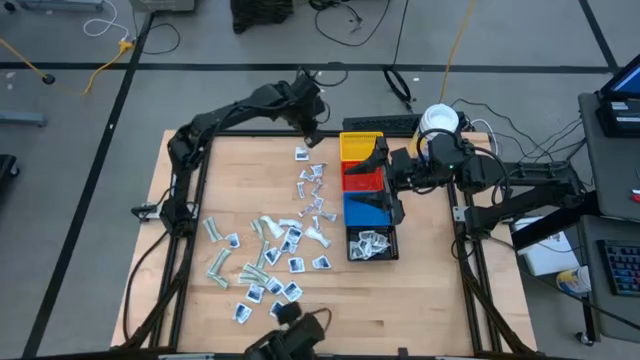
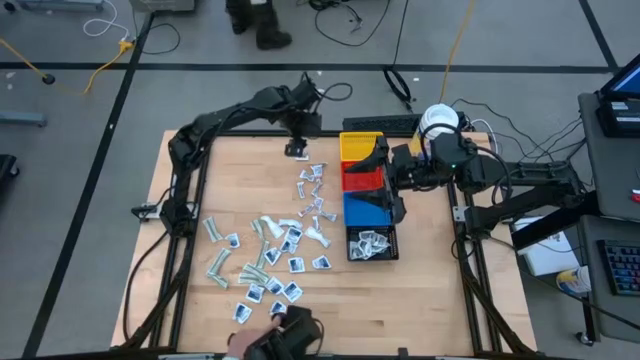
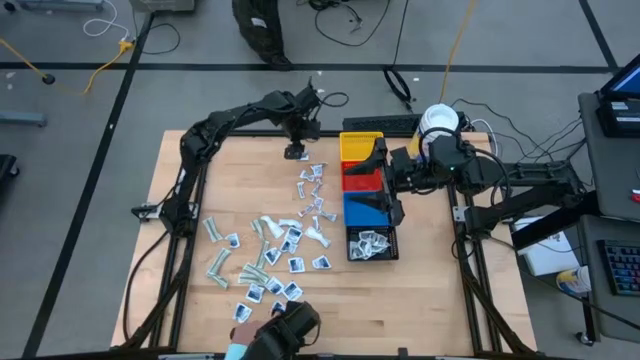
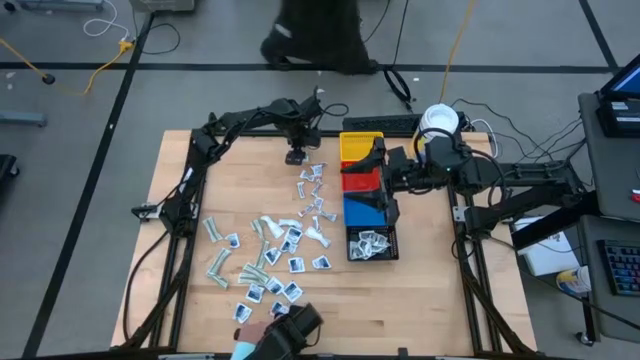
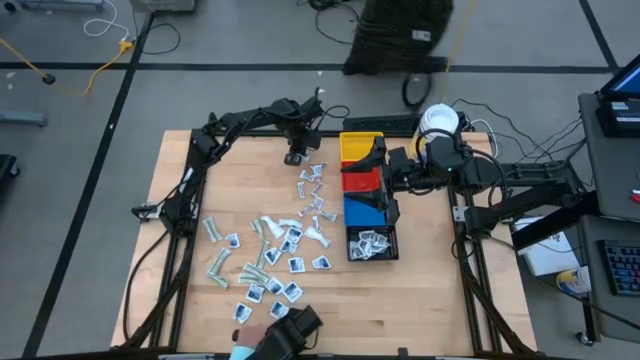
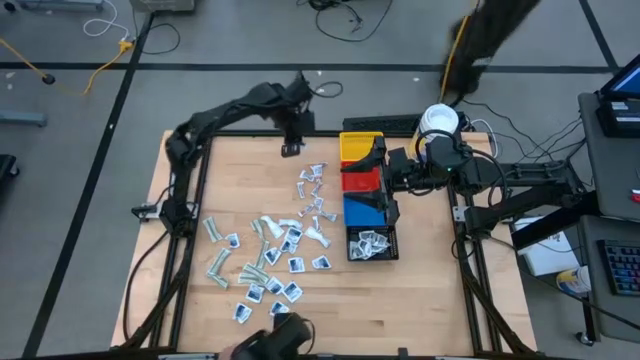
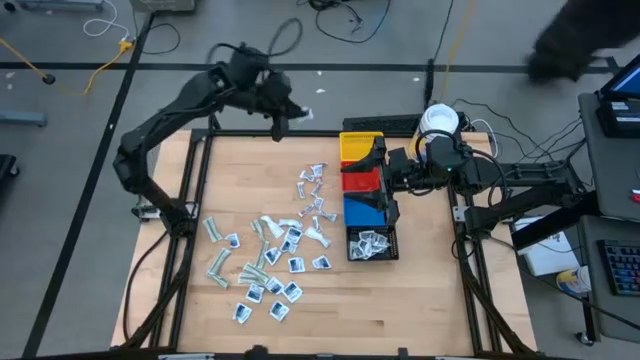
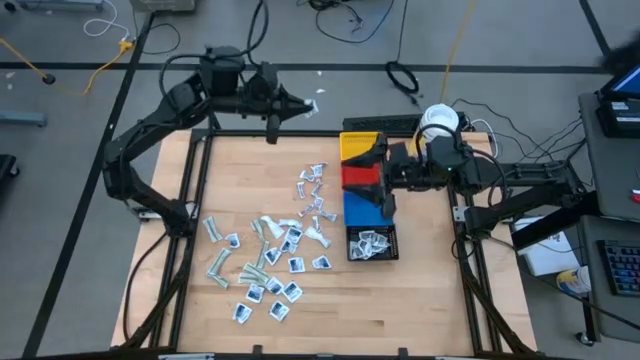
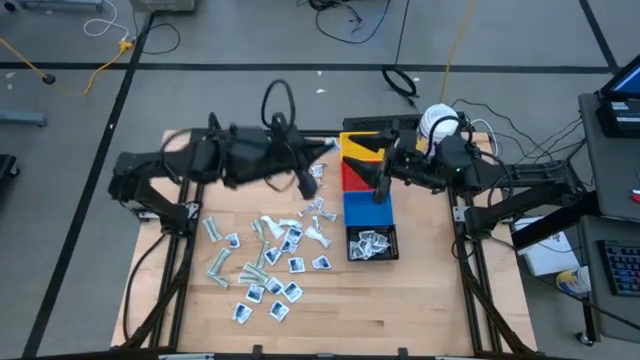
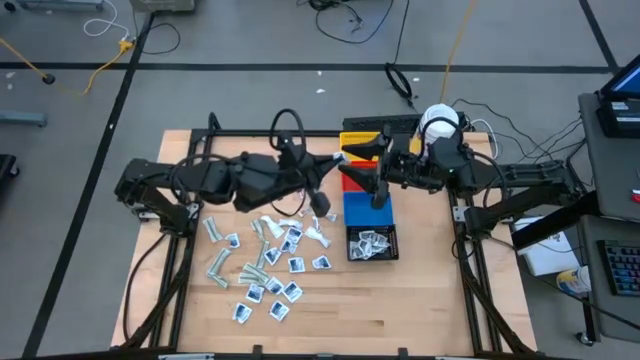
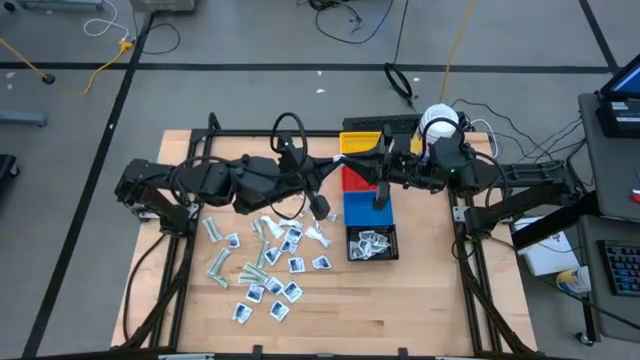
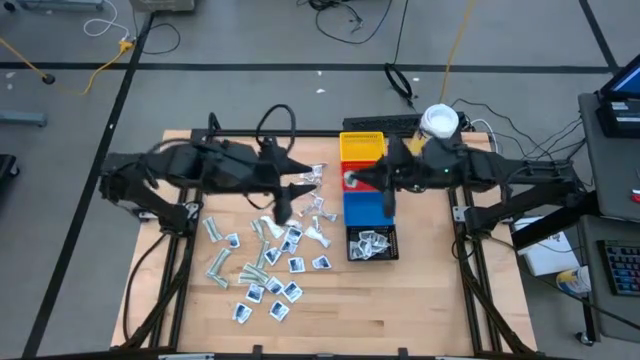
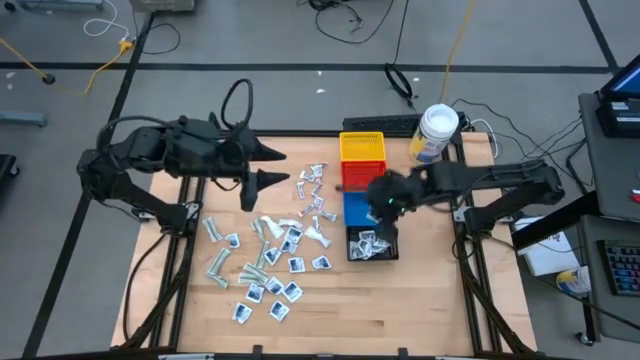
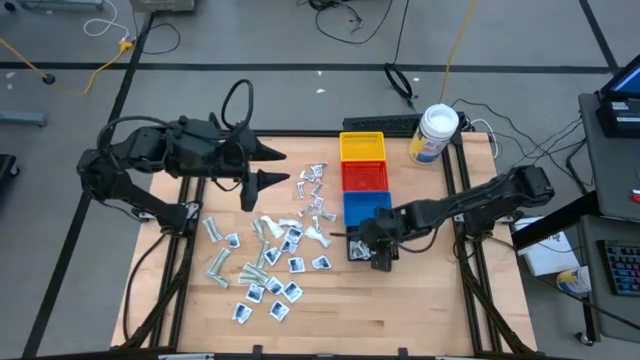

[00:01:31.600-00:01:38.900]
Task: Pick & Place First Aid Supplies
Put the black towelette pack into the black bin

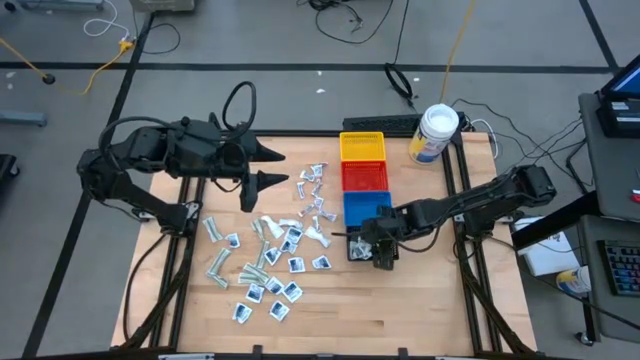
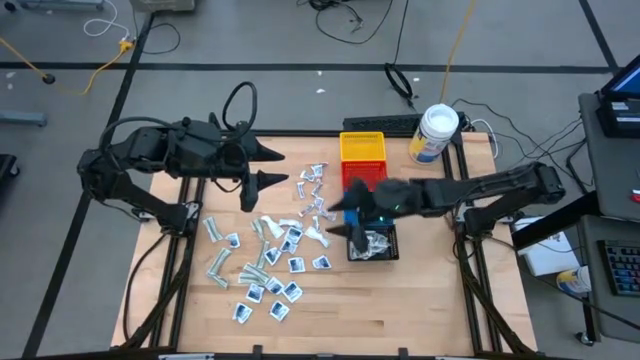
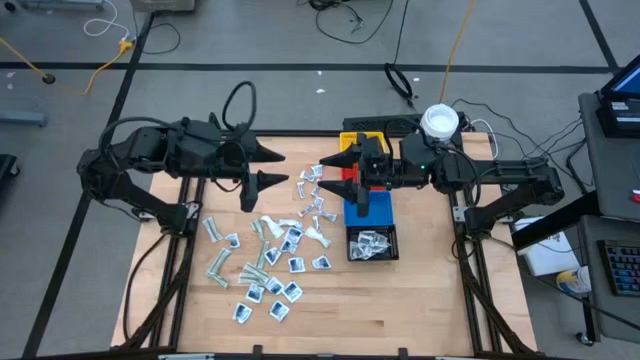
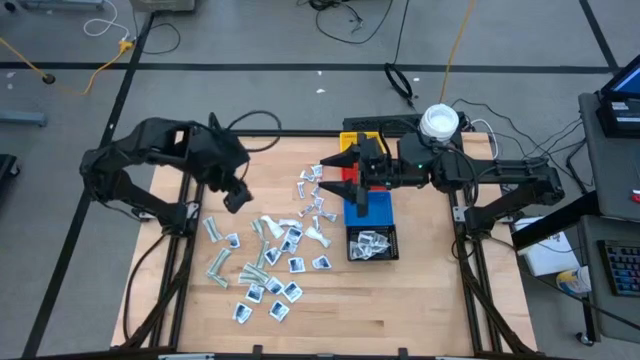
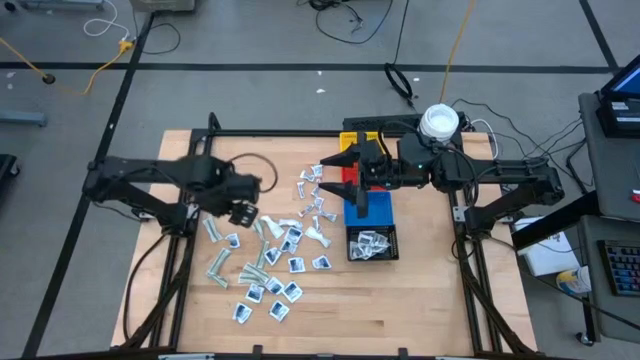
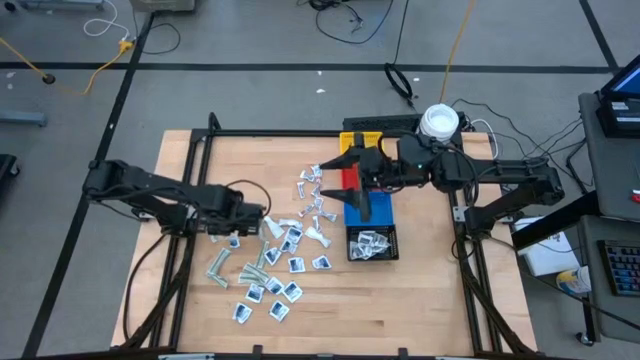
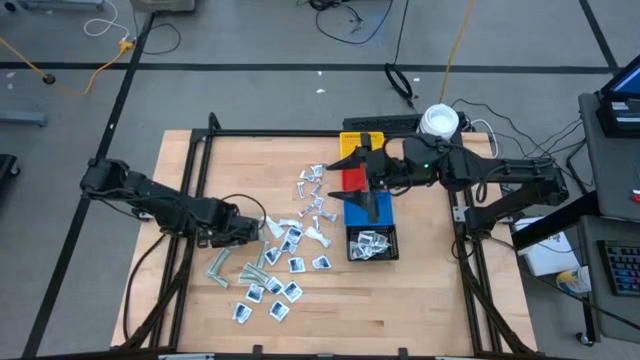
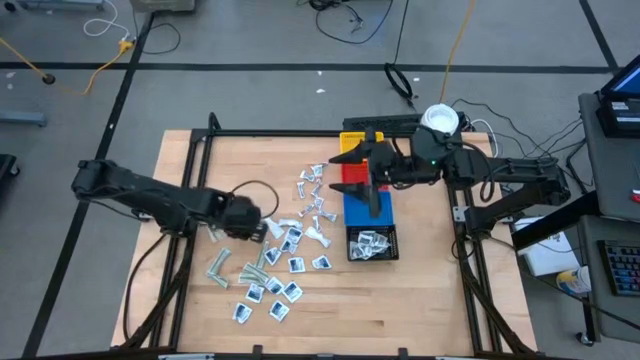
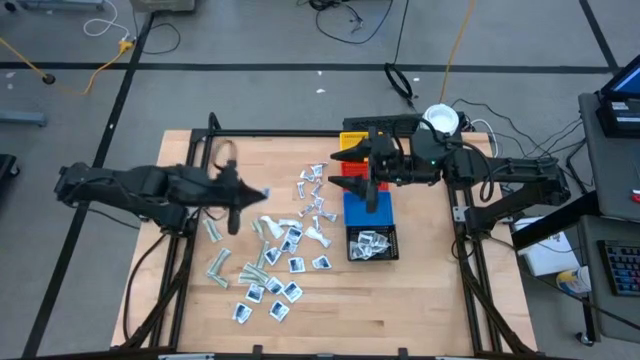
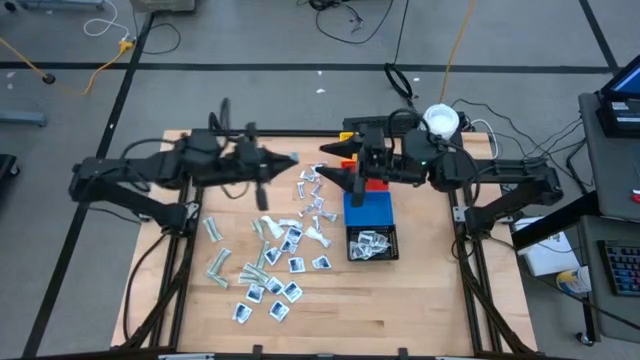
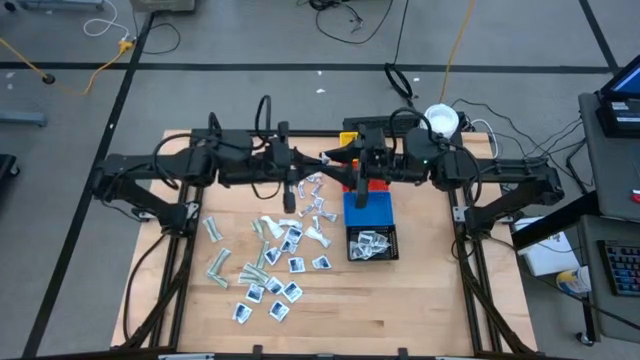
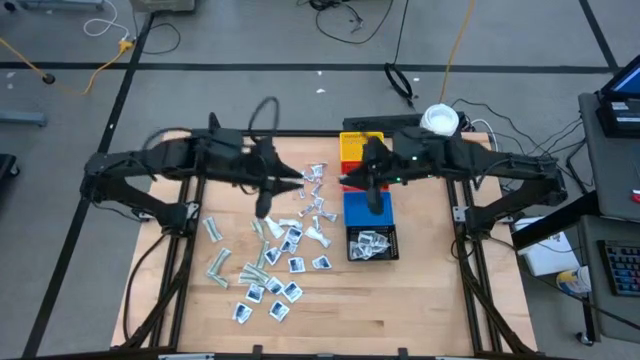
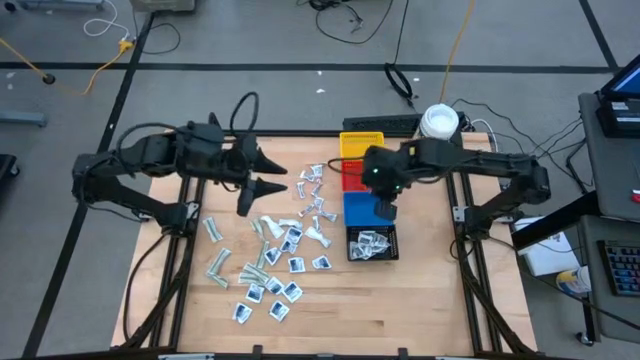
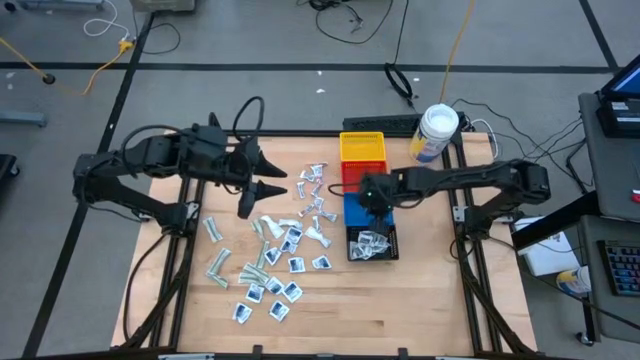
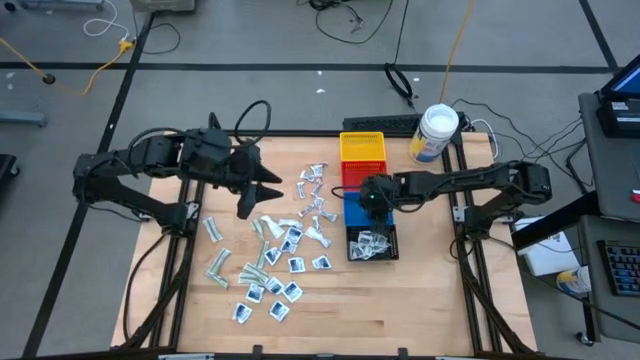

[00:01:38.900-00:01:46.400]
Put the blue alcohol pad into the blue bin

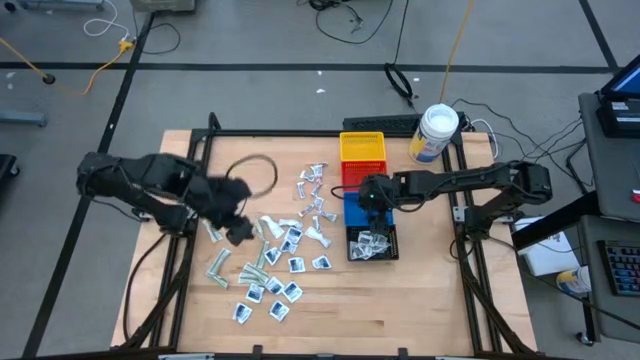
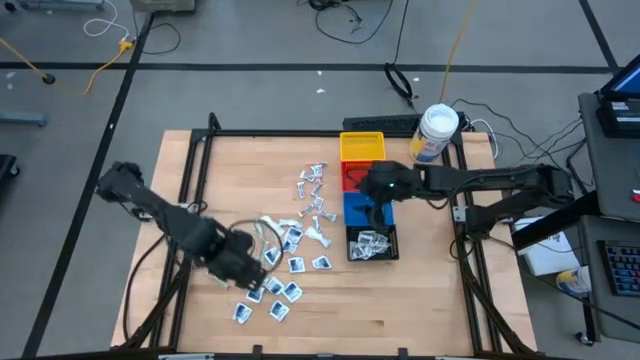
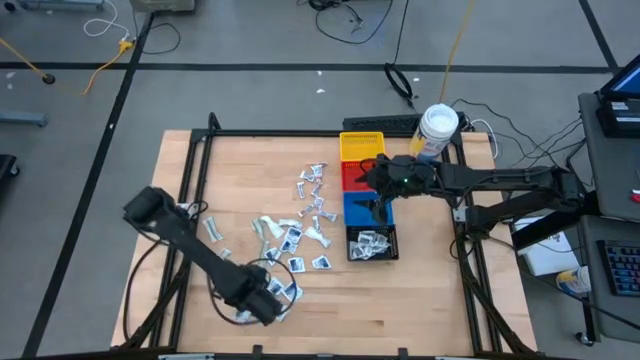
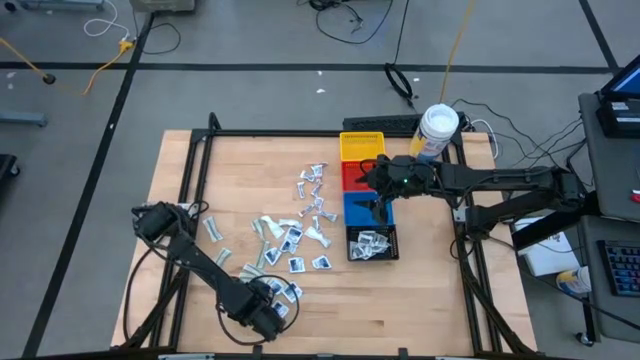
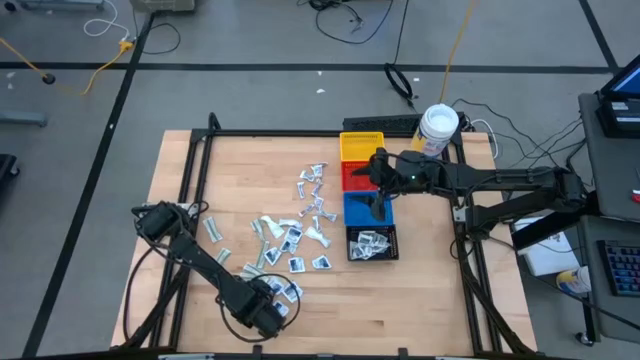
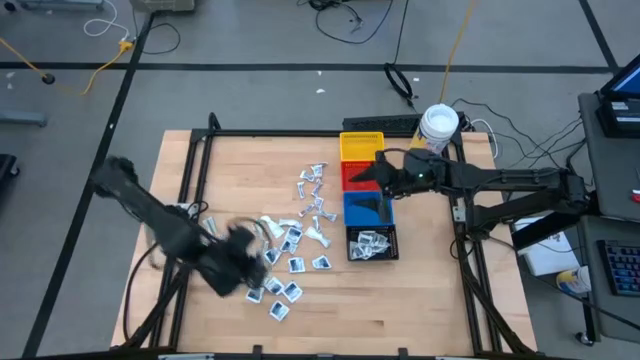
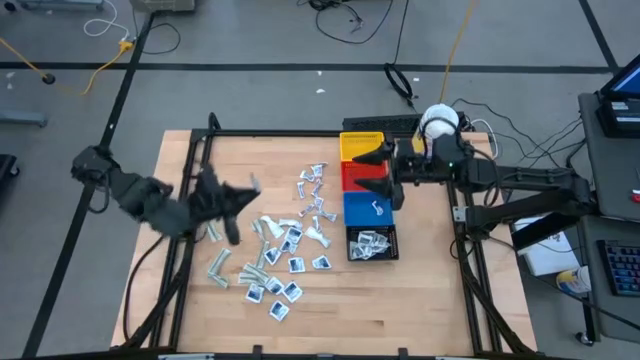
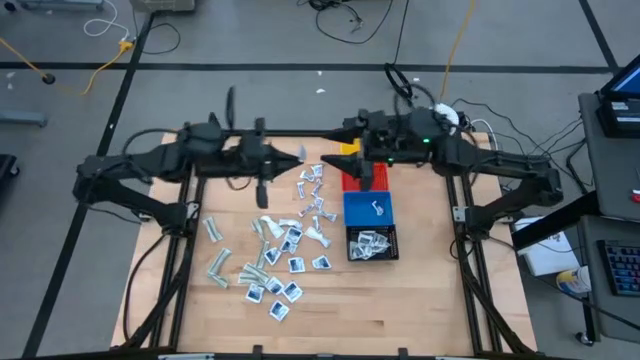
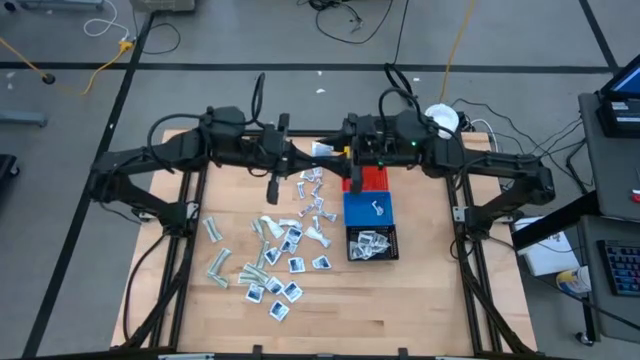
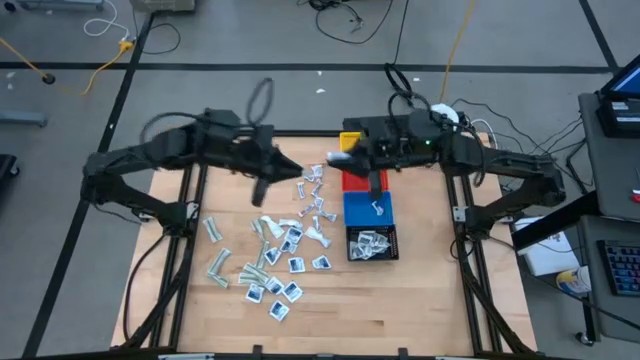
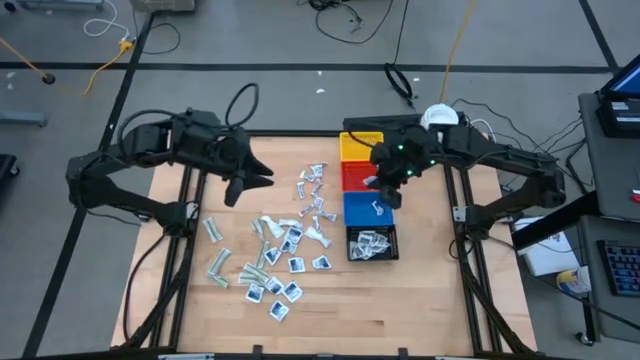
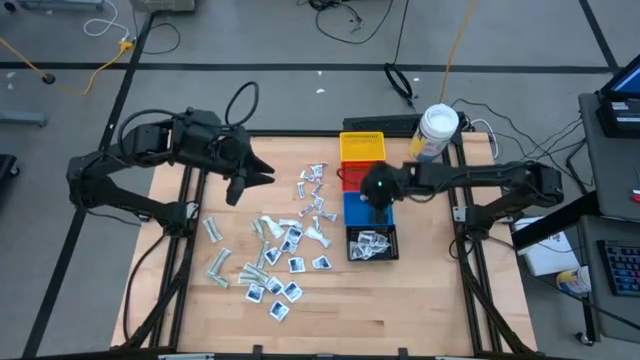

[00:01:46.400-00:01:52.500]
Put the blue alcohol pad into the blue bin

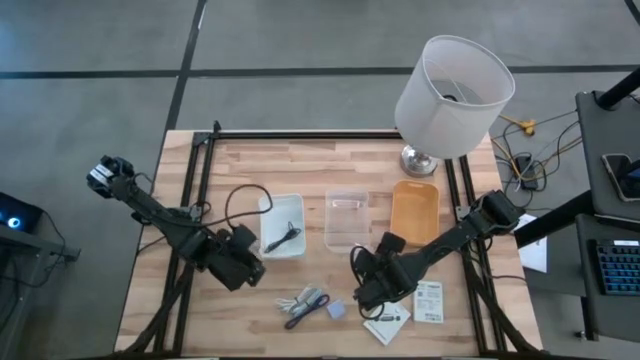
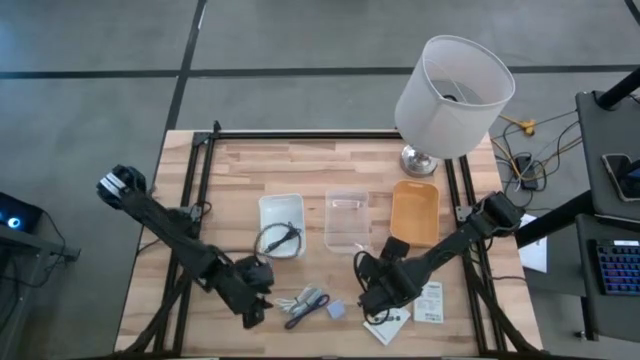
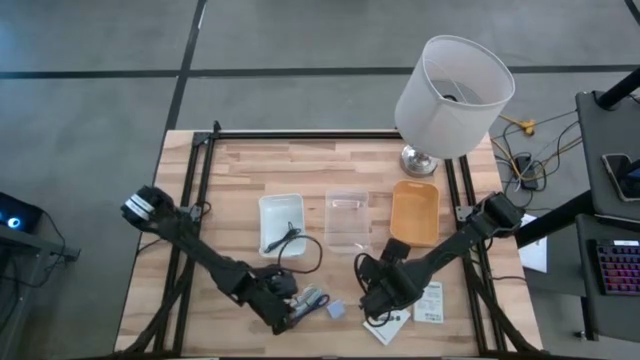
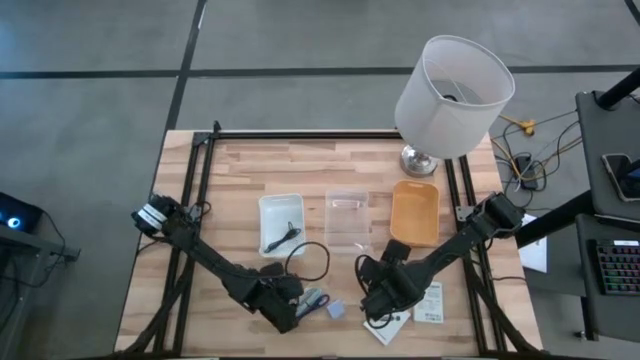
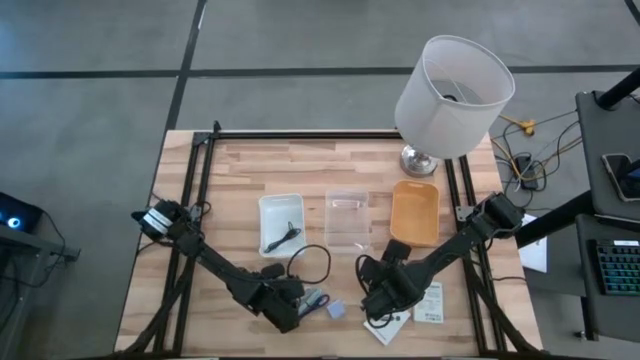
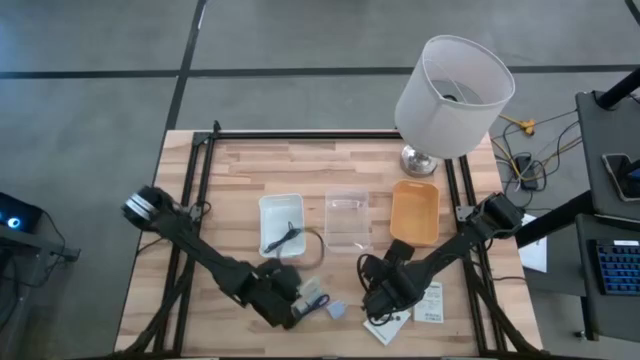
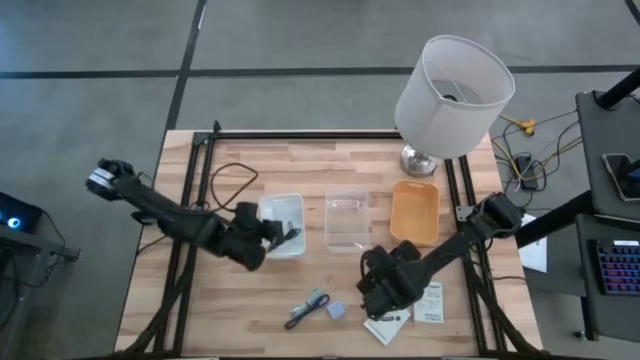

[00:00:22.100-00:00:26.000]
Task: Pick and place items into bin
Put the white charger cable into the white bin
